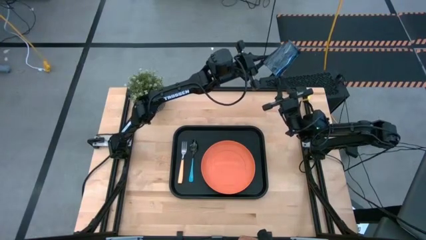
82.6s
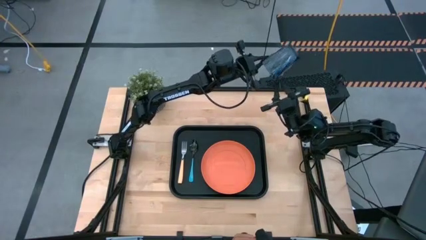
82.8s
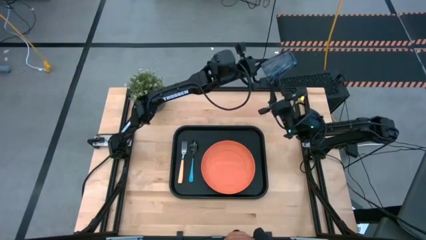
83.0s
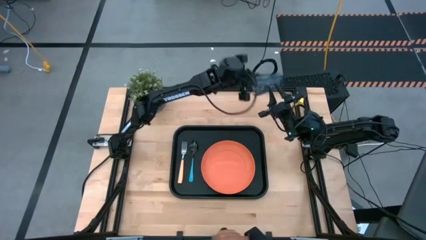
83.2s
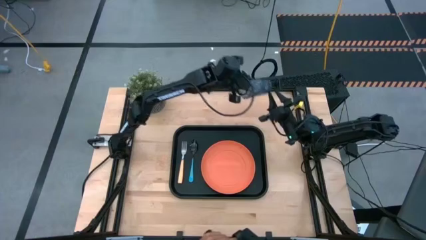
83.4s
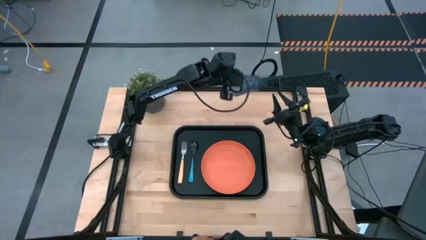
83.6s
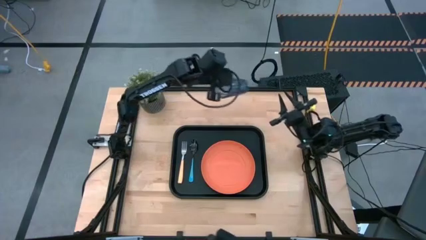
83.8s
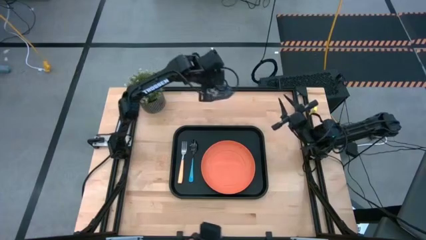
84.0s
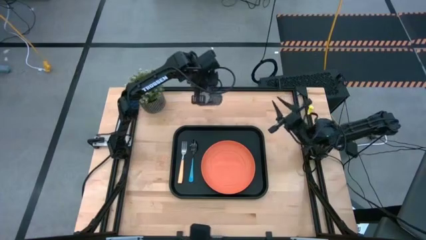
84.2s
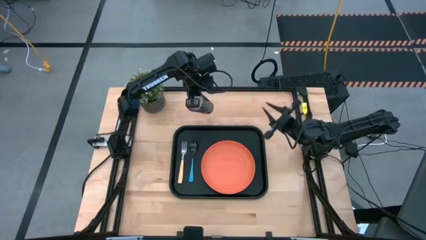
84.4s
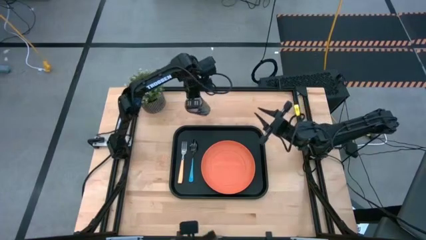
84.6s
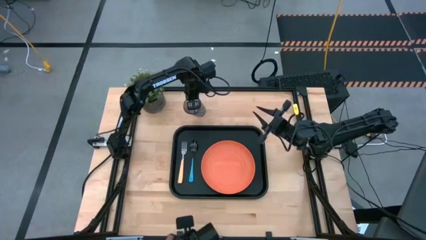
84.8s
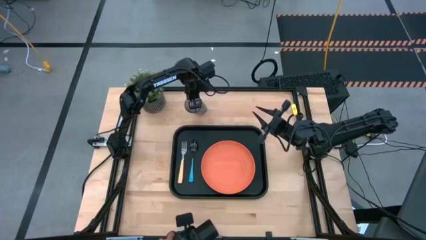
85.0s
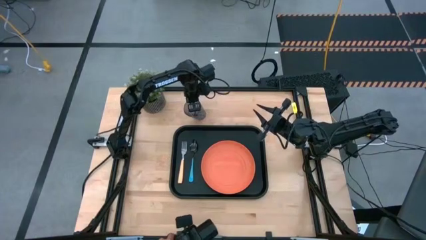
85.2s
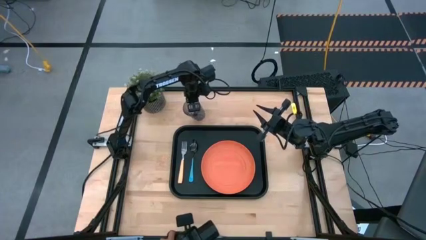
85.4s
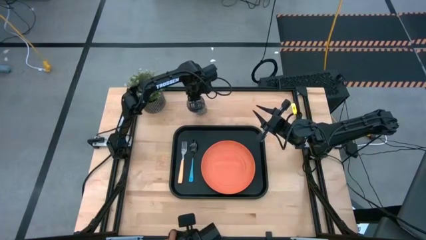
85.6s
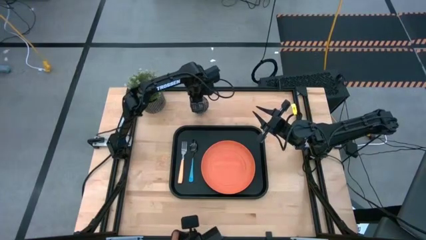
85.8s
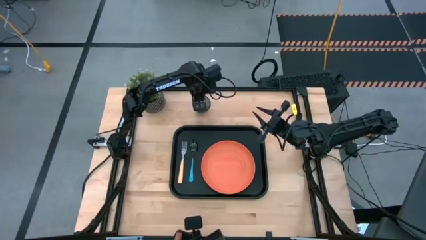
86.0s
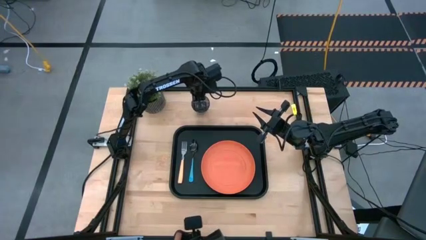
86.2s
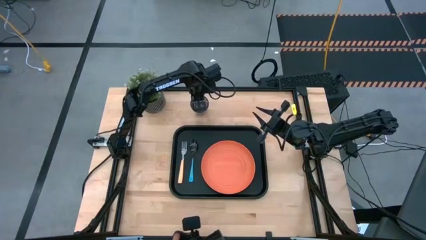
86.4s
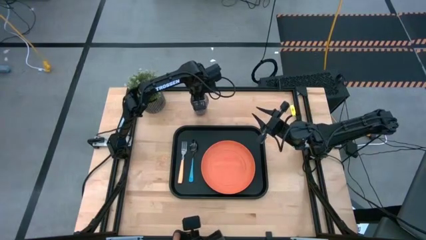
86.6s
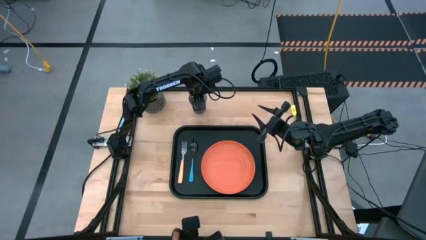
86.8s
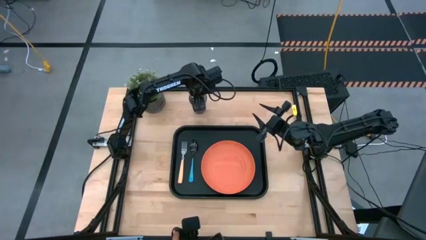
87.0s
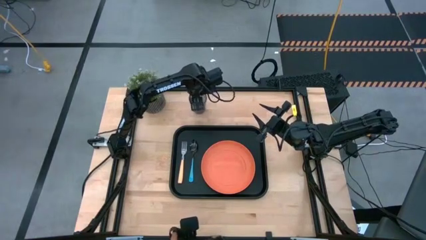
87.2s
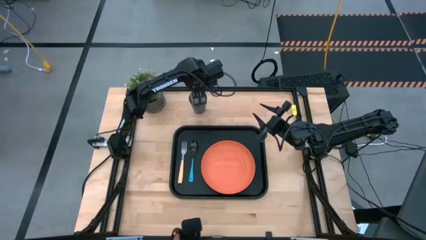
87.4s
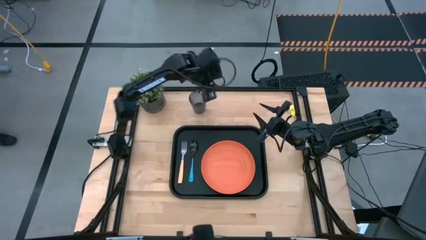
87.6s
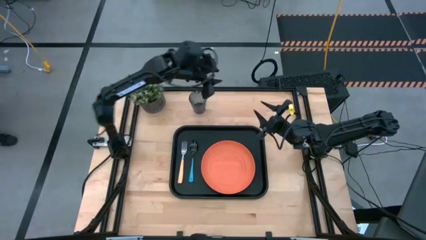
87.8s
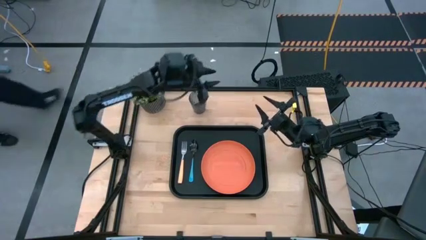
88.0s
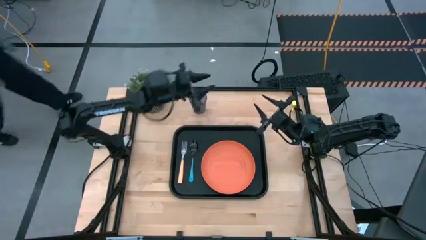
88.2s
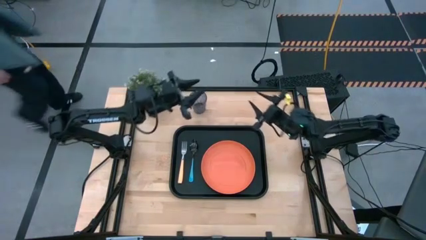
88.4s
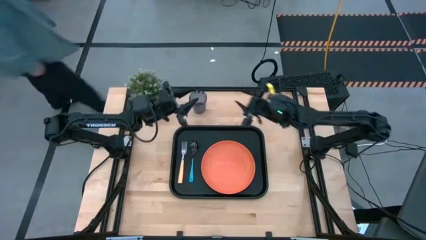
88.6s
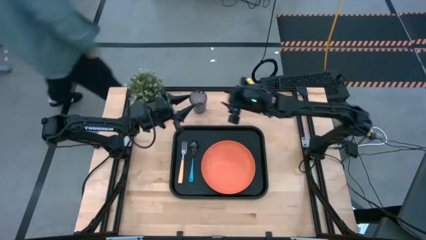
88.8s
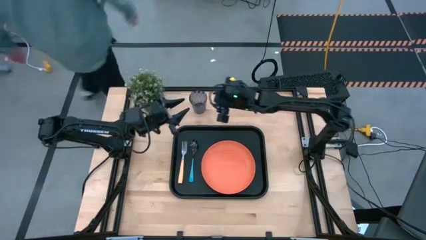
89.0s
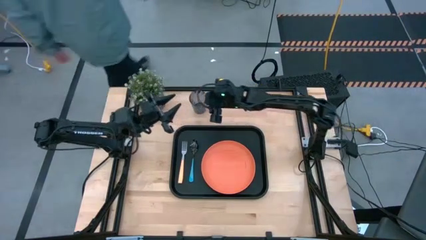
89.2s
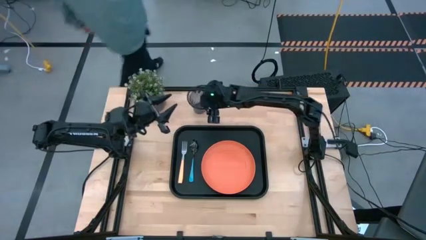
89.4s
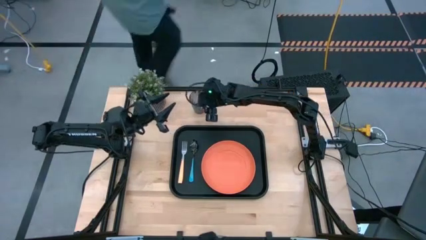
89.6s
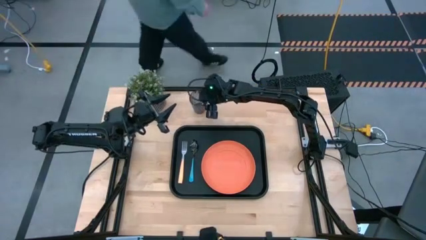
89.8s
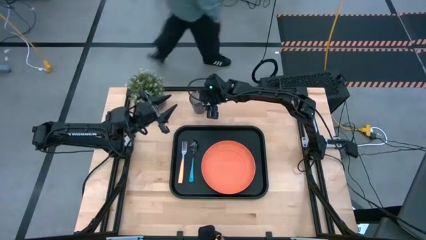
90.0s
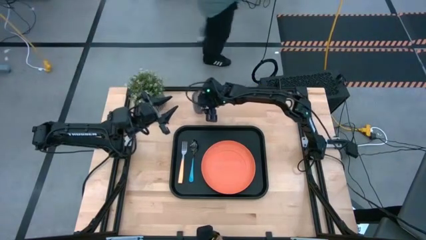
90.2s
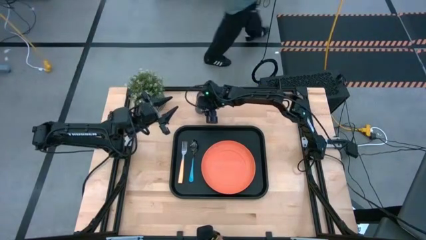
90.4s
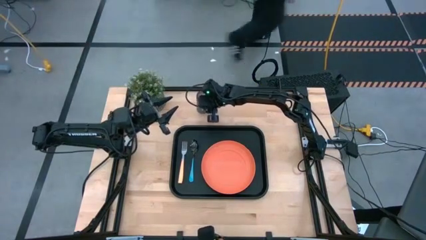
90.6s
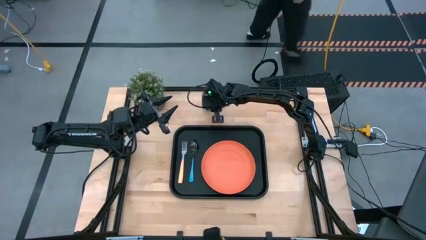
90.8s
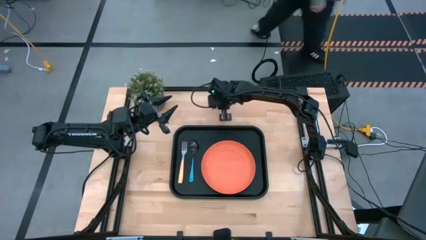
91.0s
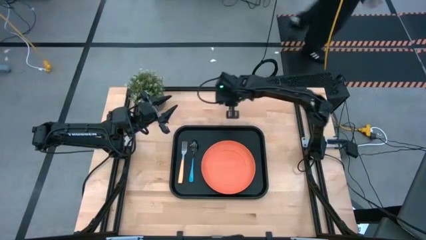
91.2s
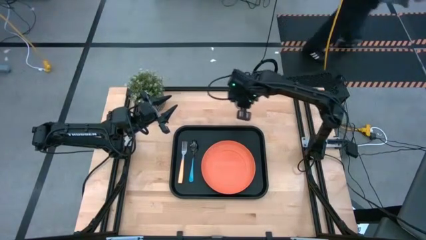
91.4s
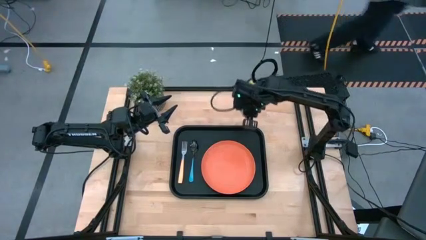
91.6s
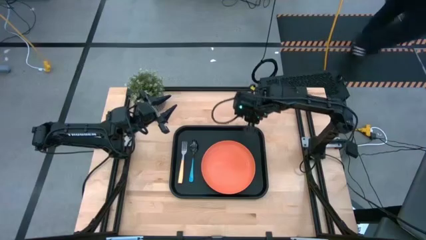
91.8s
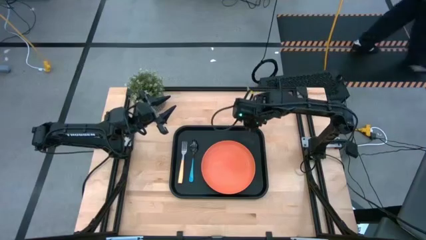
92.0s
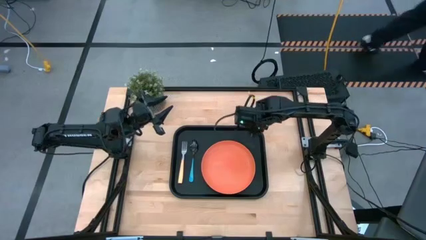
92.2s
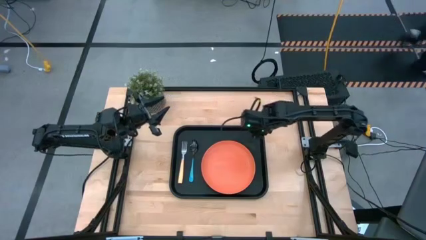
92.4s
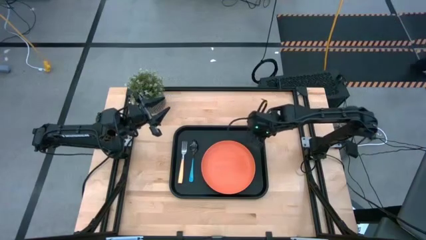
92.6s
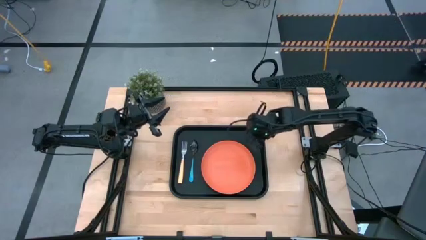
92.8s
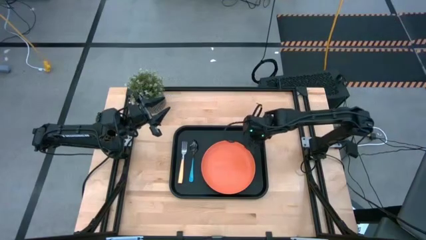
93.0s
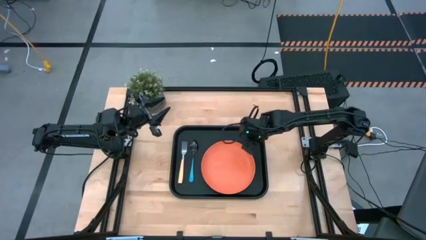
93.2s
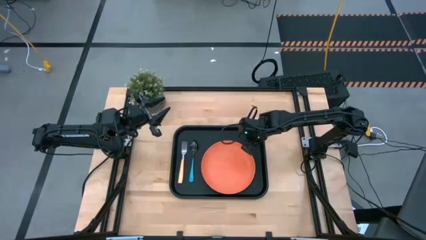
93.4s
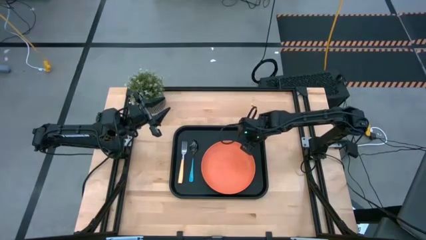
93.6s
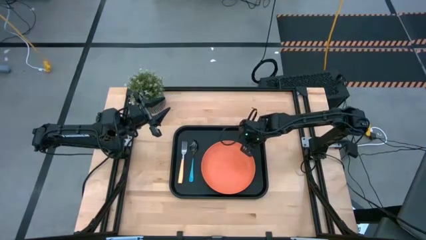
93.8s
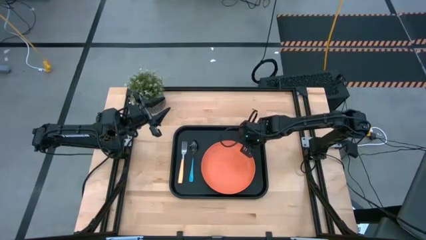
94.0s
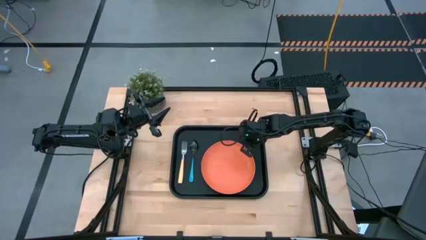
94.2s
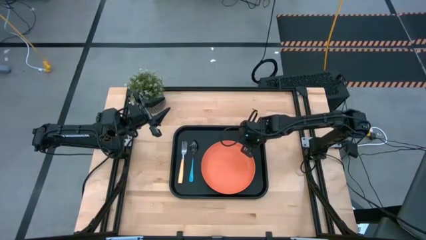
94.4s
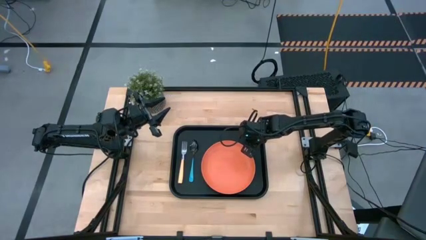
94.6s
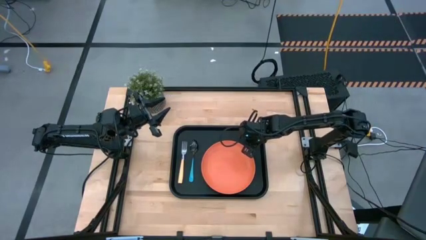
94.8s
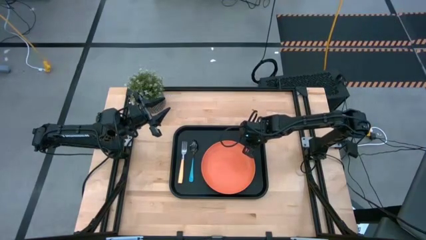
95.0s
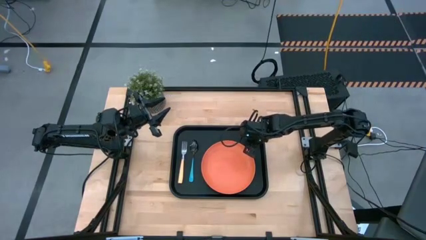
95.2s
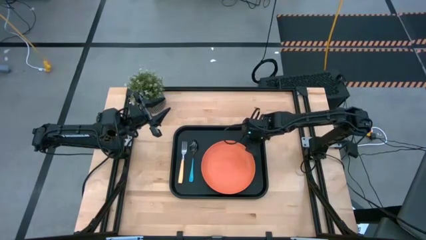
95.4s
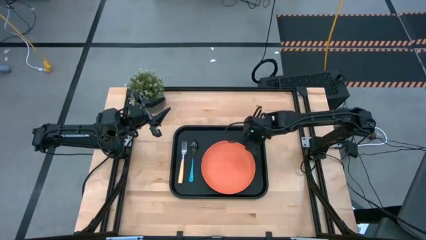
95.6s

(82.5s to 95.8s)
Task: Pick and place plate/cup/fork/spoon on tray
Put the blue cup to the top right of the orange plate on the black table tray

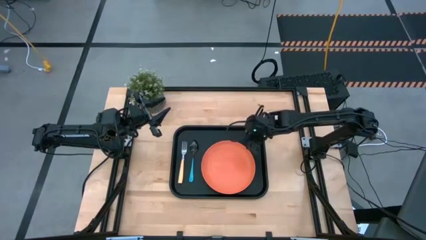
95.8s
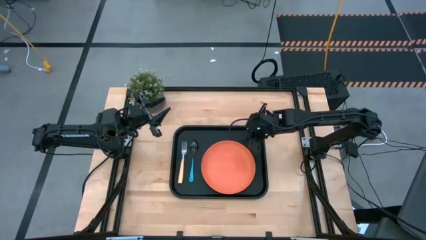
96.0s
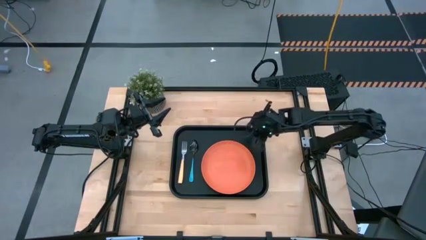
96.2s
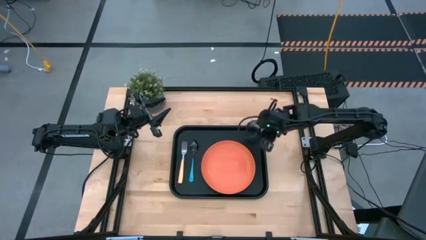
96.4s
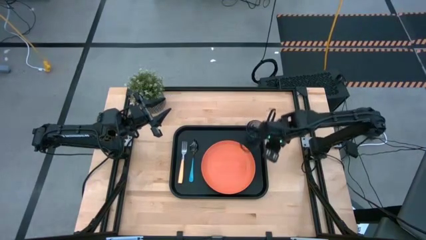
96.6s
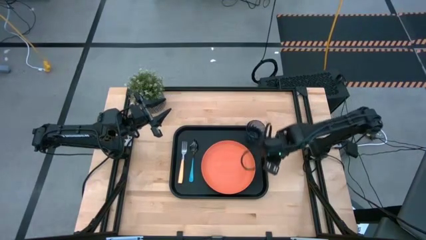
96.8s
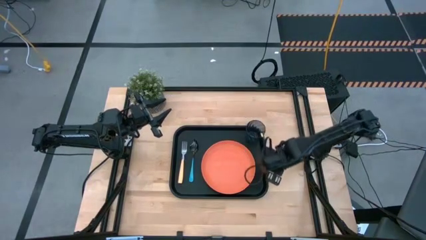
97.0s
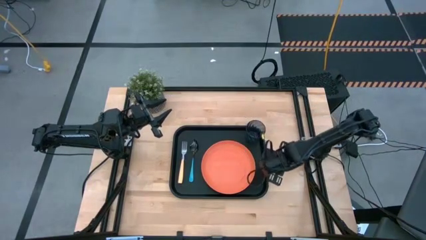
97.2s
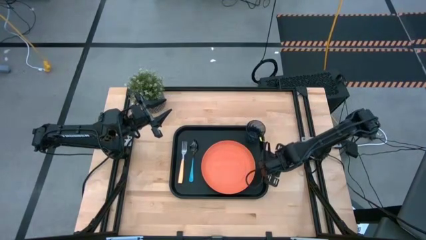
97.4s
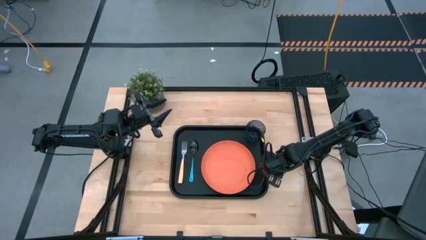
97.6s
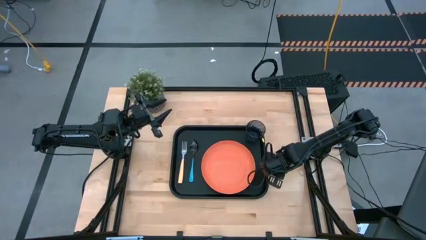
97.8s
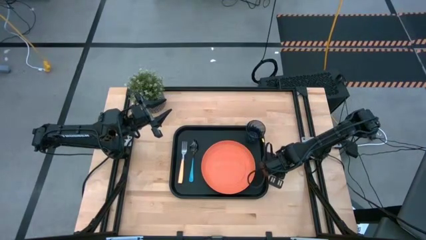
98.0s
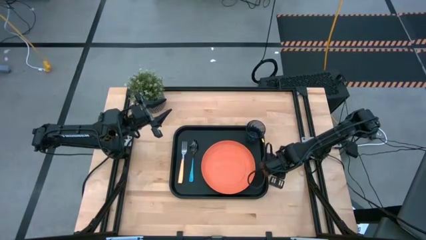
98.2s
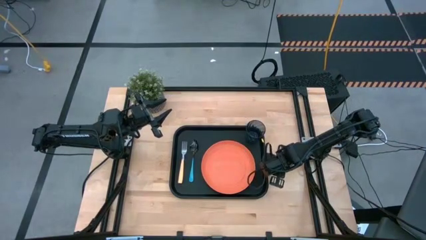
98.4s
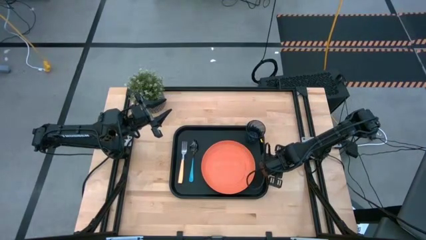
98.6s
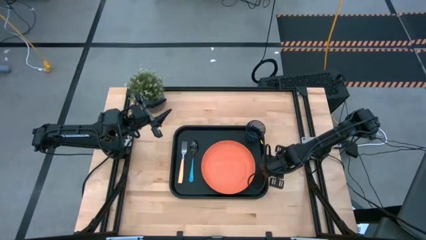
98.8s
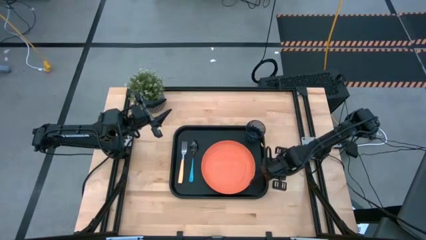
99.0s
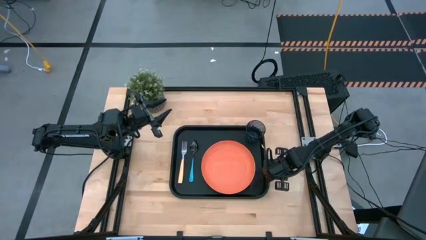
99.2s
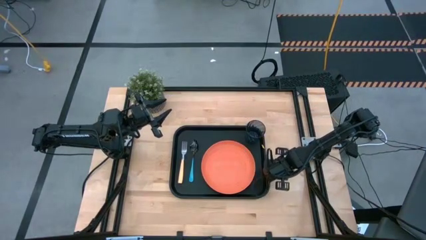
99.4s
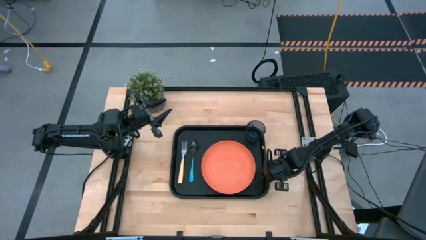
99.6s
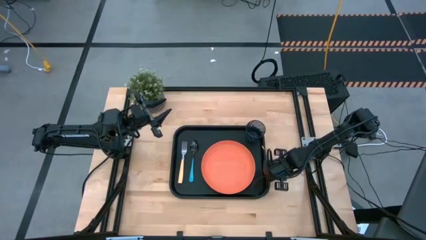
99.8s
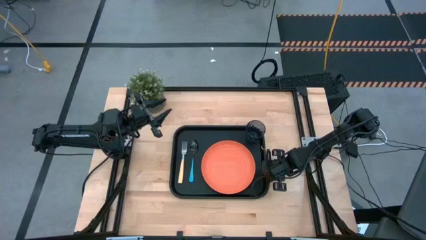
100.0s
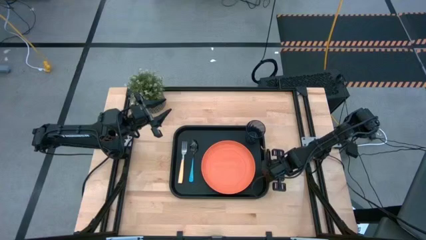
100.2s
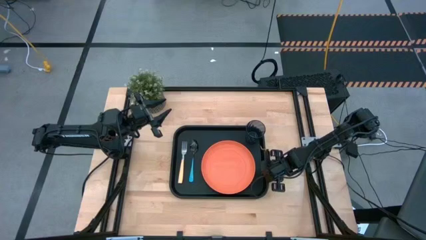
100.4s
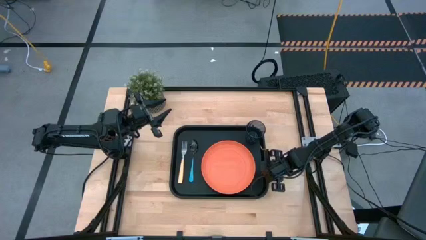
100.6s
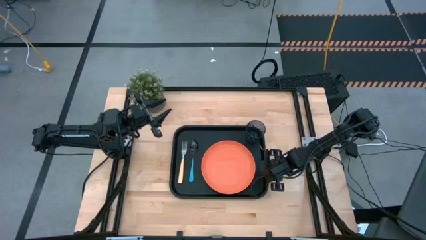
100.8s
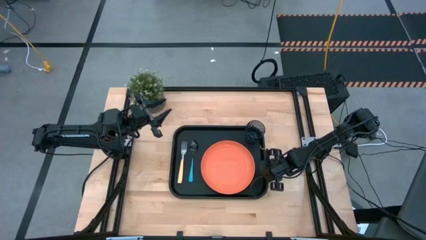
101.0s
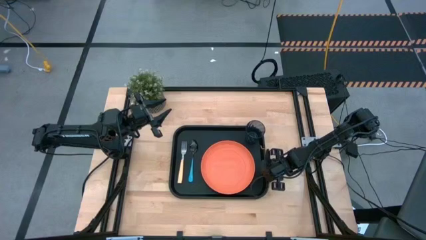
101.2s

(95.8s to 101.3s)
Adjust the black table tray
